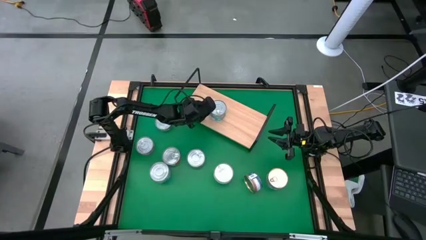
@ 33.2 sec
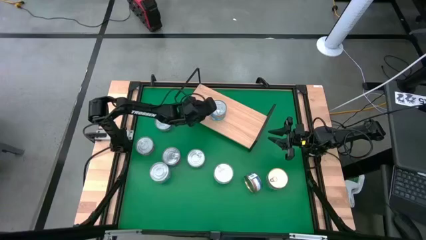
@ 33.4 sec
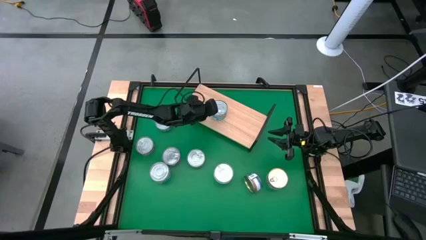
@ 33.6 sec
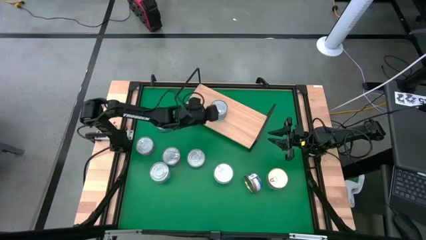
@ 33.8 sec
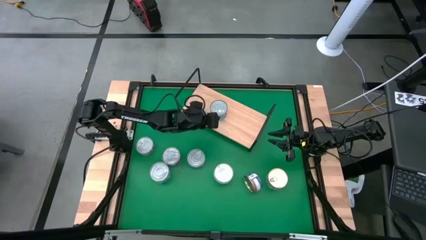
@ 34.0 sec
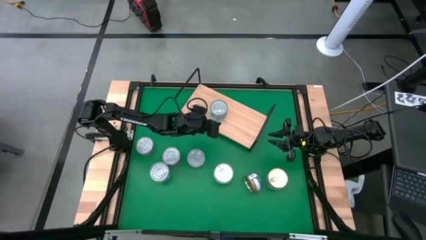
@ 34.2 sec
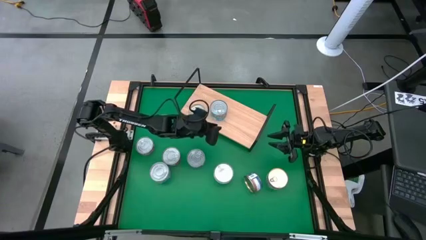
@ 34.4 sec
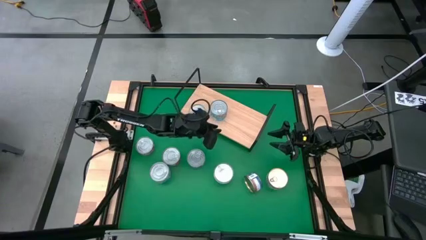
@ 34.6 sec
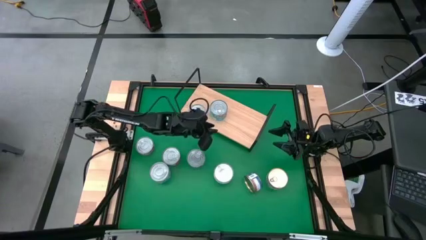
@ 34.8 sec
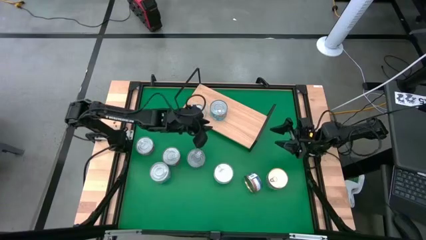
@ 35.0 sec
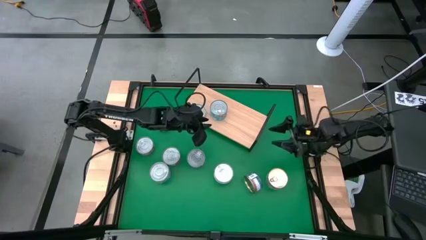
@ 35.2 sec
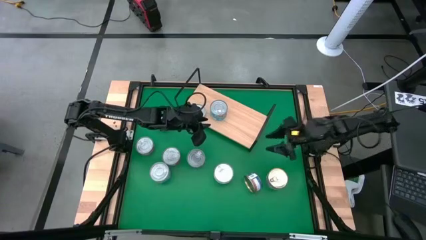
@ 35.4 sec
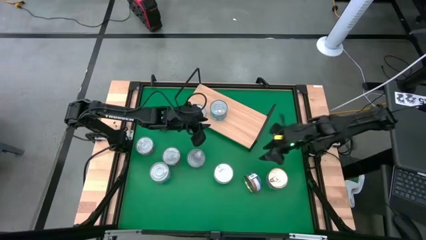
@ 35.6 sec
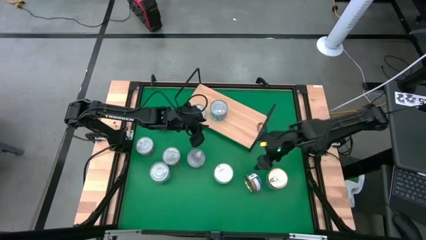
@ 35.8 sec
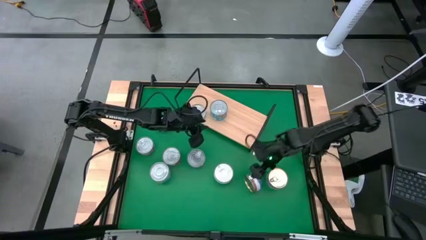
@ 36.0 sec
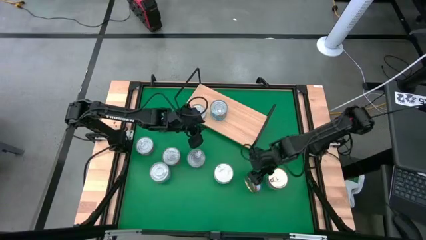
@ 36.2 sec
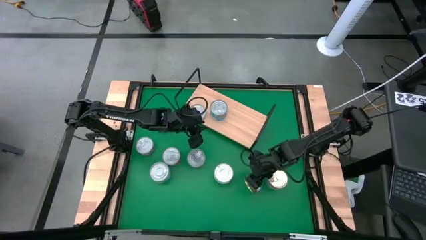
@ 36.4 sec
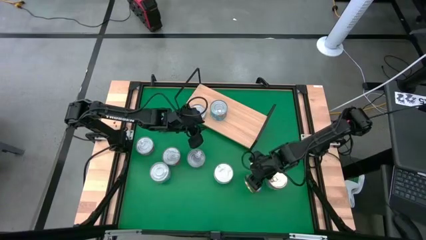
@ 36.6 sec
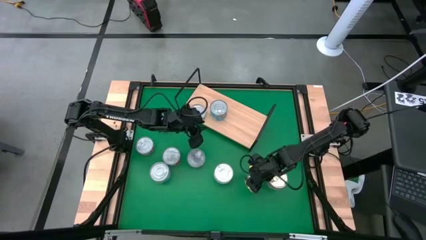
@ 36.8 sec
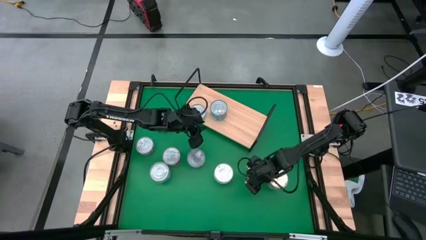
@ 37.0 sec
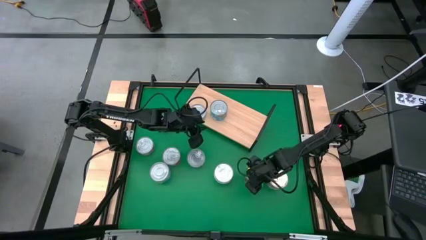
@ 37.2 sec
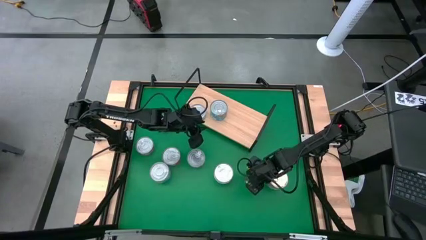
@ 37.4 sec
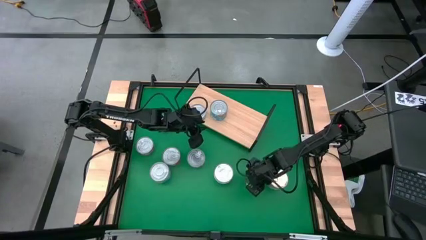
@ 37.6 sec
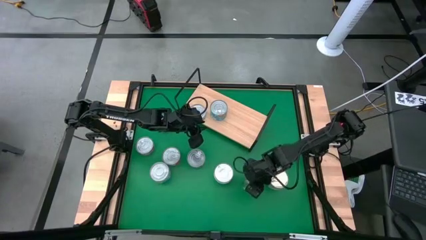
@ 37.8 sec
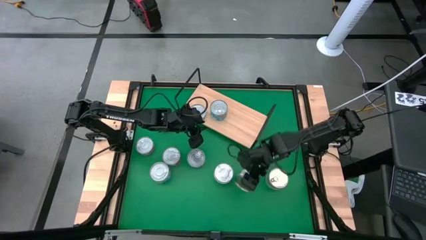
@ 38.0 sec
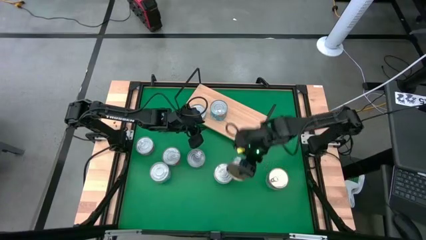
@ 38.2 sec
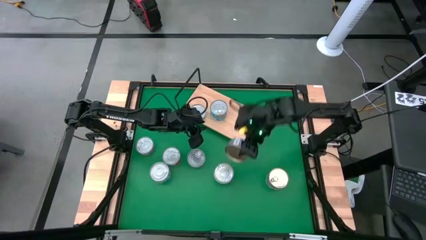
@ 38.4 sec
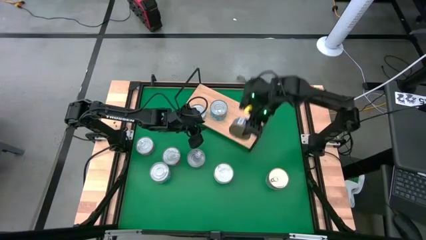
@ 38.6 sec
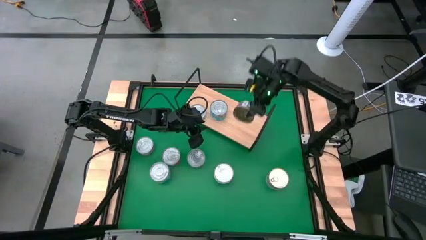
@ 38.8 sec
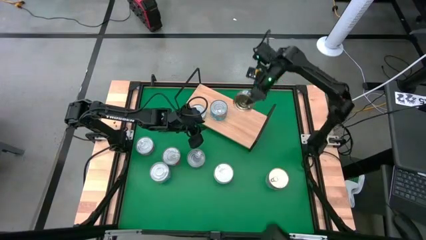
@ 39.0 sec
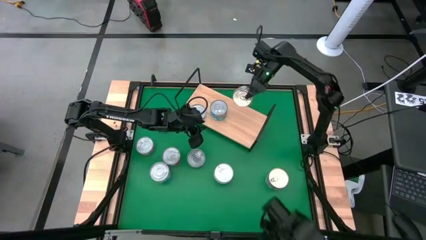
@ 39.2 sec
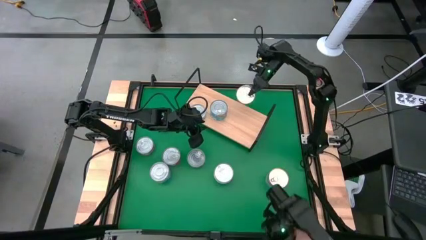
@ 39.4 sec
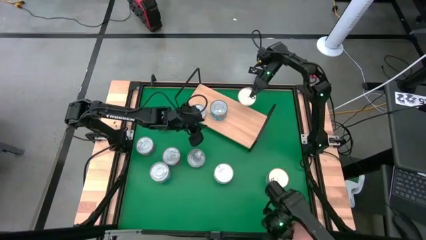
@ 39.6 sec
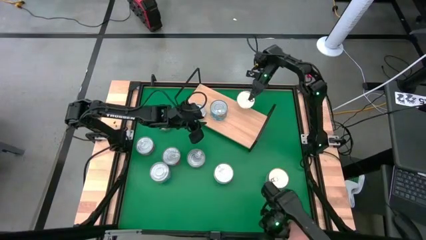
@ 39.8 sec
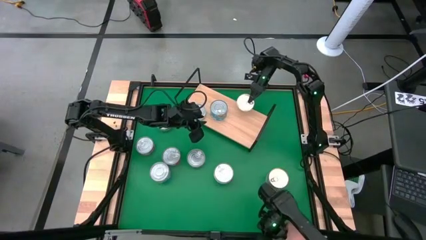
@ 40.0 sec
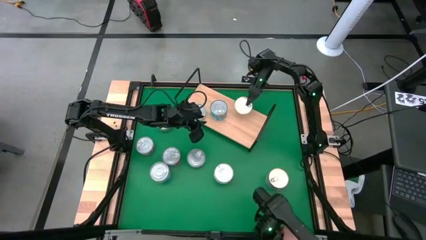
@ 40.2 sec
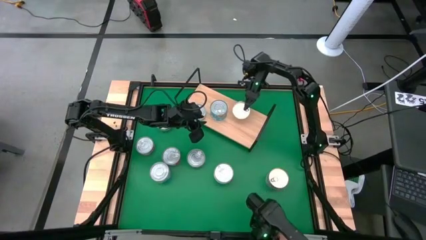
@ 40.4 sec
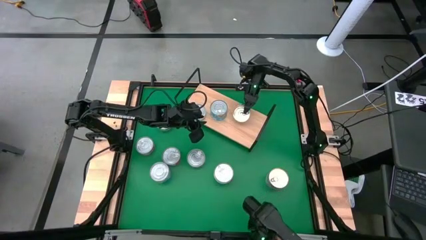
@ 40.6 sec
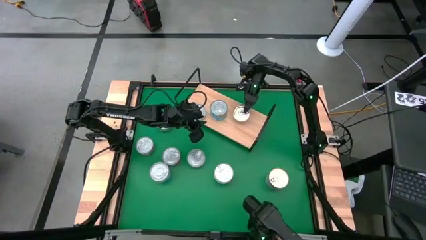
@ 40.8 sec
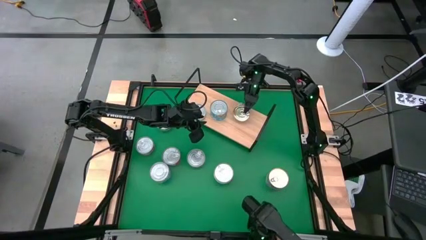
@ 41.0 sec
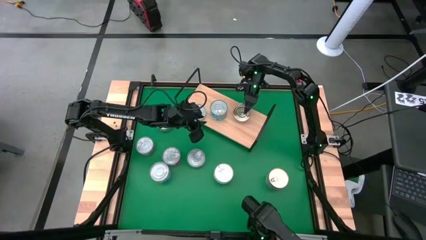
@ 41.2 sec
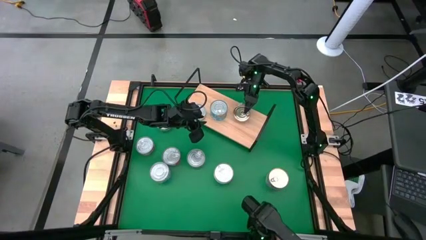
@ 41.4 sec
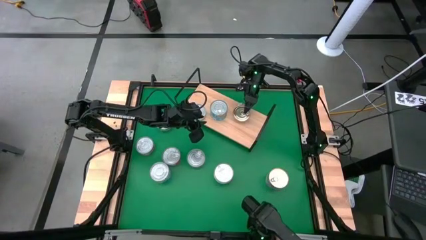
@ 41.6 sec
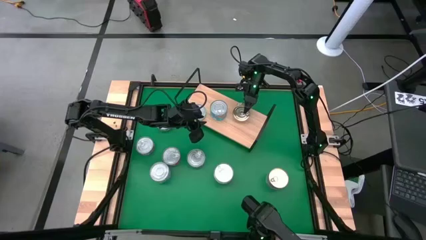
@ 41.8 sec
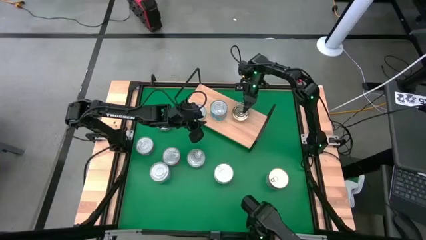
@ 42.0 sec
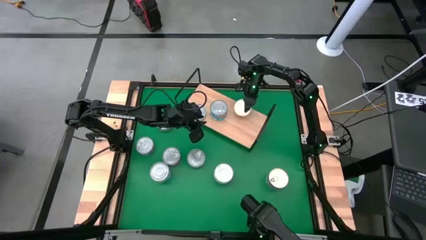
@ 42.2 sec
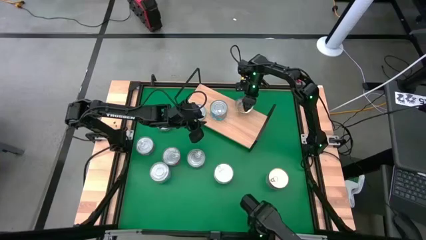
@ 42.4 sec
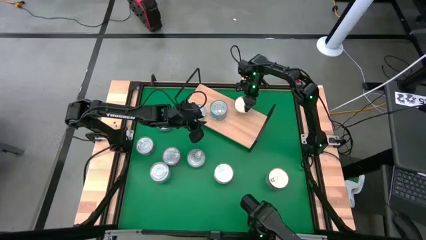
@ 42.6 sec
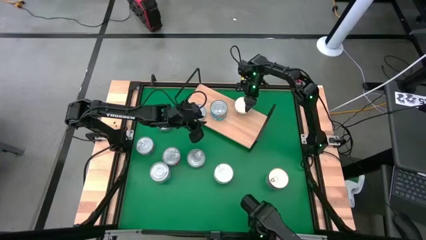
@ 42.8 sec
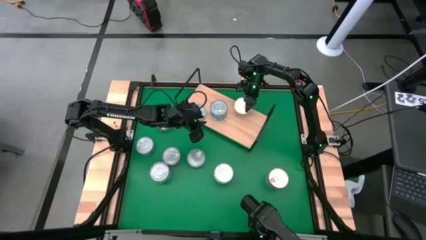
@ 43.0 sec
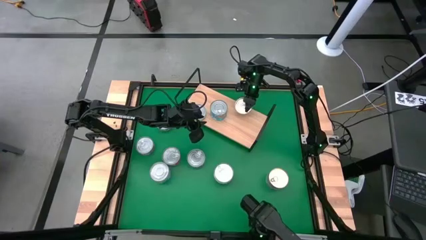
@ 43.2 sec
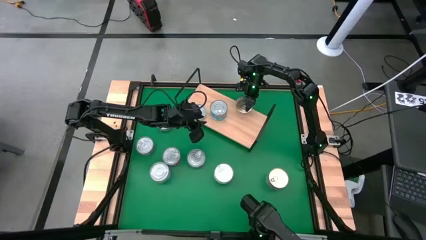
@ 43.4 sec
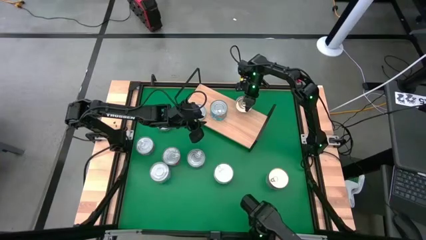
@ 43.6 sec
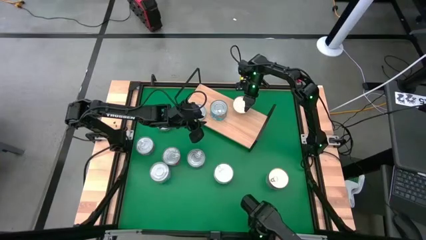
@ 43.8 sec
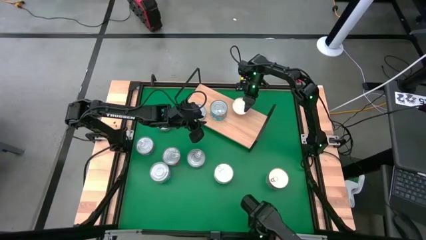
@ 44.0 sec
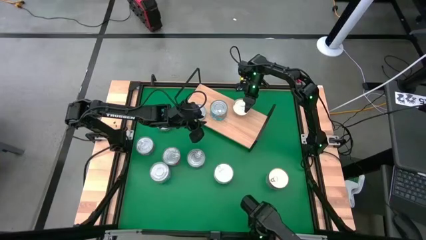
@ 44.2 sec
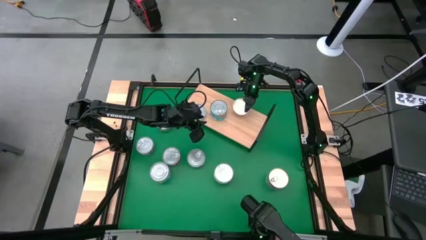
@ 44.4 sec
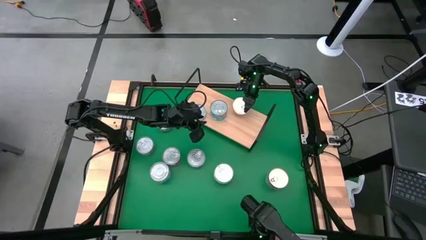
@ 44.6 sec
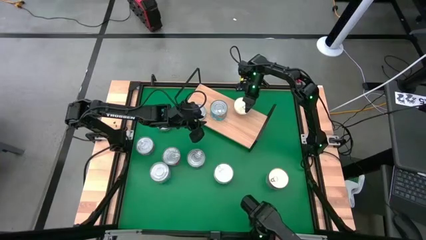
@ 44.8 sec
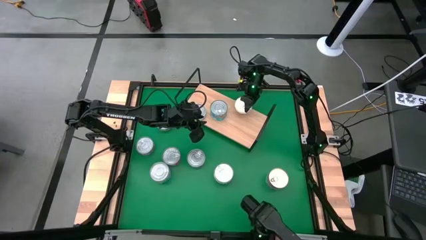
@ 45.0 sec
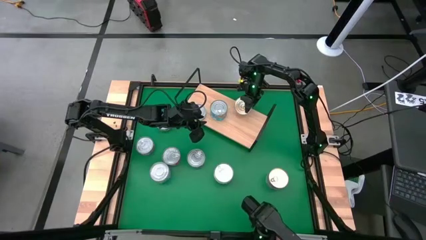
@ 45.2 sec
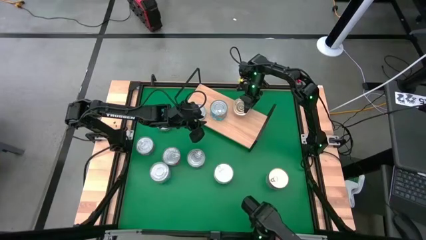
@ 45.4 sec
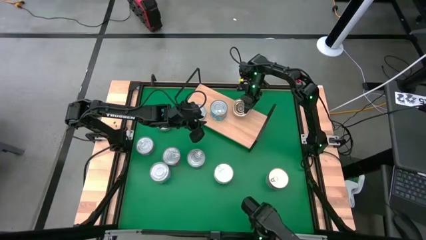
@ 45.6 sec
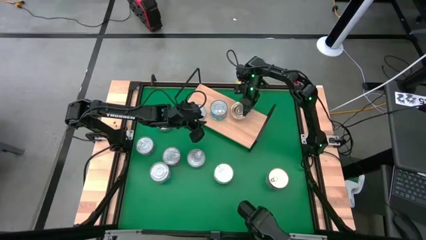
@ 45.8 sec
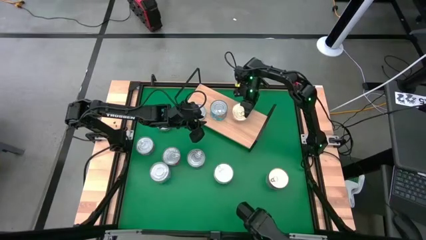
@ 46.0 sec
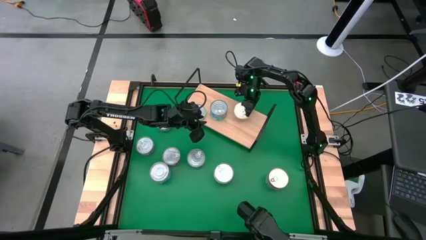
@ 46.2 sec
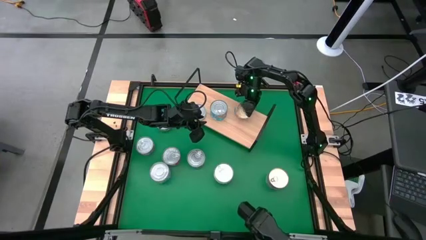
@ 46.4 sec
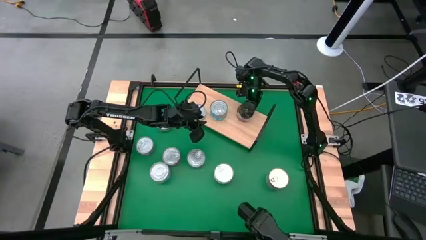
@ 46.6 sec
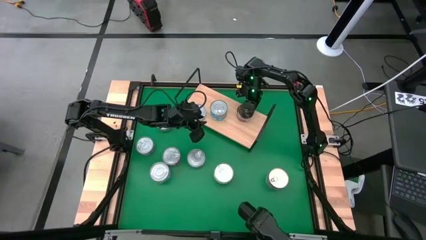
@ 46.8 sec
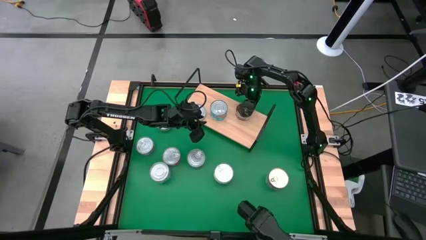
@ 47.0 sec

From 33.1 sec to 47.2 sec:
Task: Stack canned seafood by type on shelf
Put the blue-pink tuna can on the shelf
